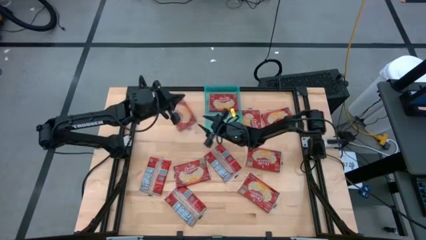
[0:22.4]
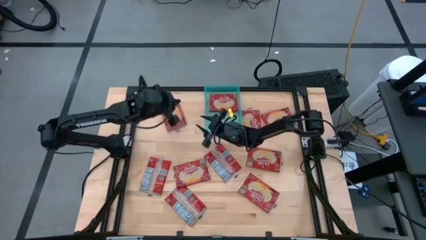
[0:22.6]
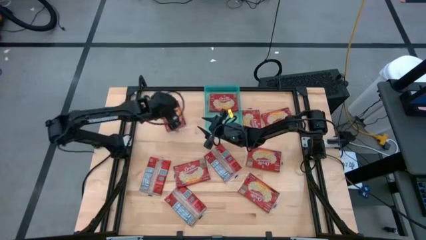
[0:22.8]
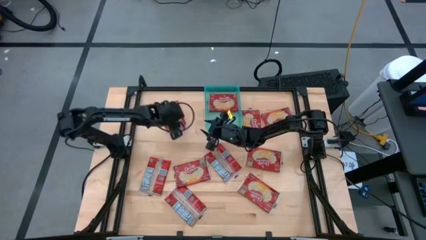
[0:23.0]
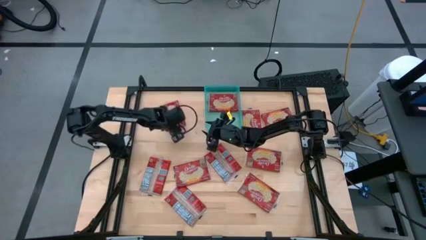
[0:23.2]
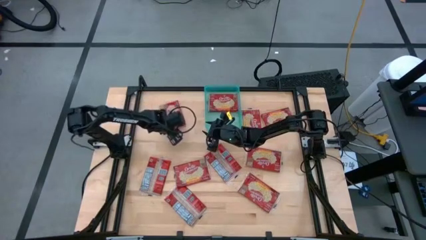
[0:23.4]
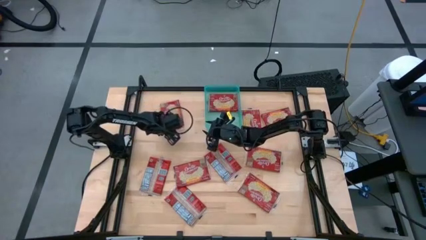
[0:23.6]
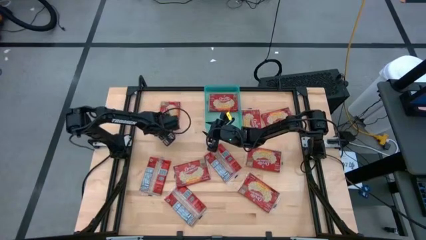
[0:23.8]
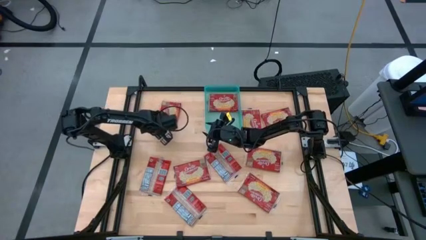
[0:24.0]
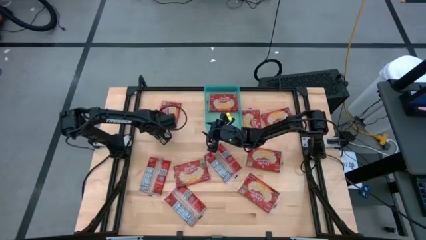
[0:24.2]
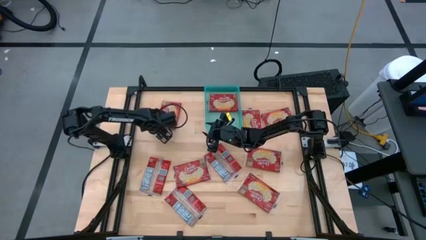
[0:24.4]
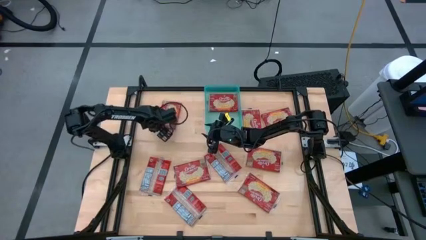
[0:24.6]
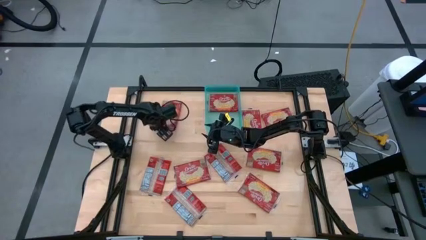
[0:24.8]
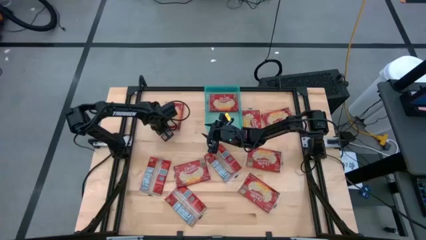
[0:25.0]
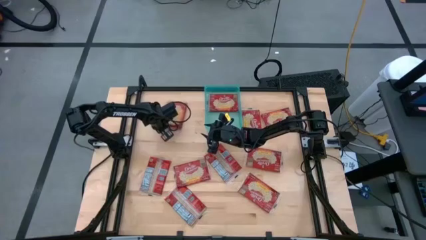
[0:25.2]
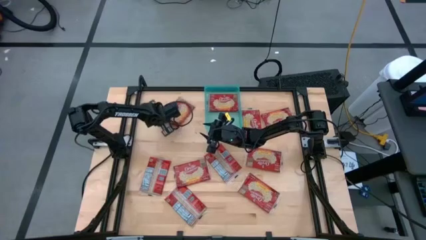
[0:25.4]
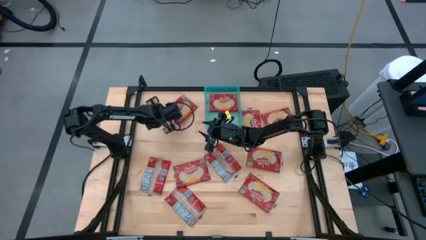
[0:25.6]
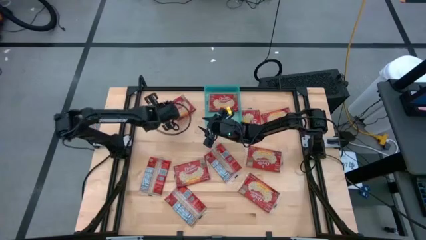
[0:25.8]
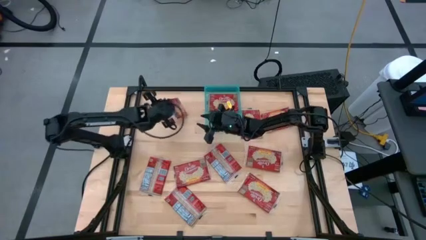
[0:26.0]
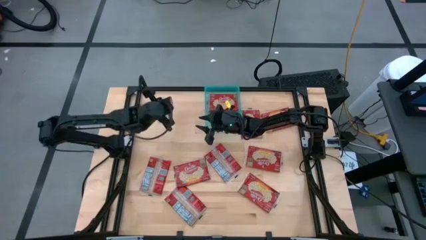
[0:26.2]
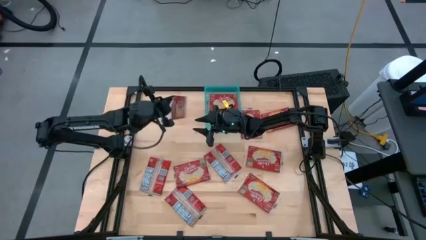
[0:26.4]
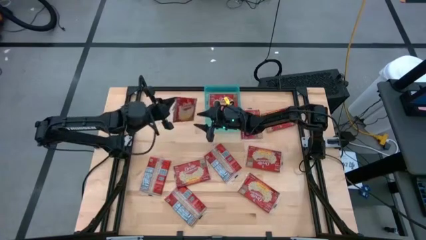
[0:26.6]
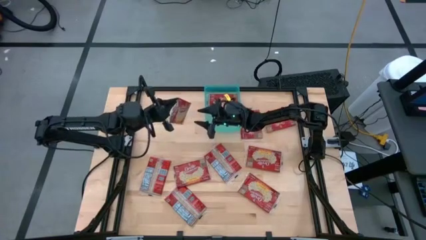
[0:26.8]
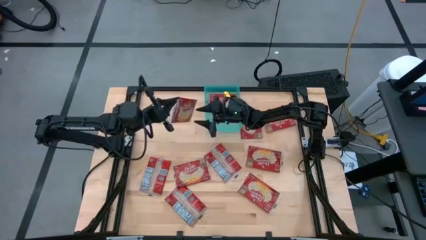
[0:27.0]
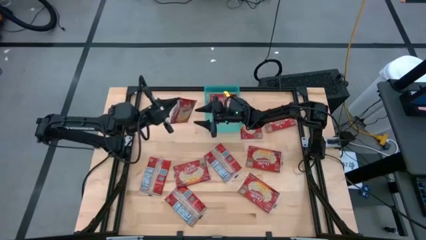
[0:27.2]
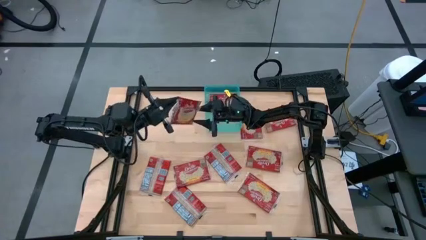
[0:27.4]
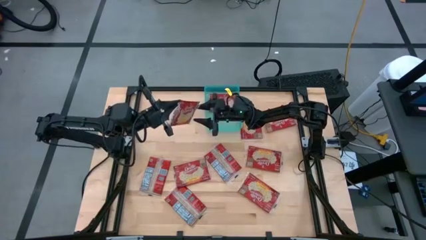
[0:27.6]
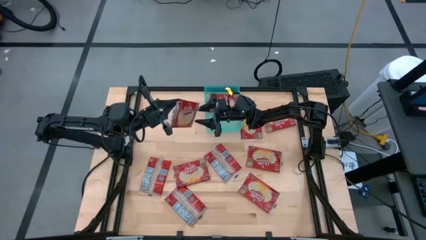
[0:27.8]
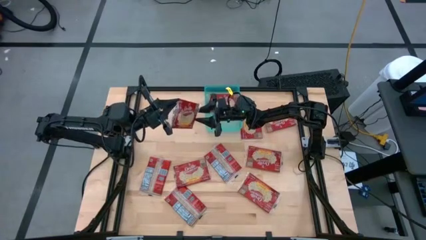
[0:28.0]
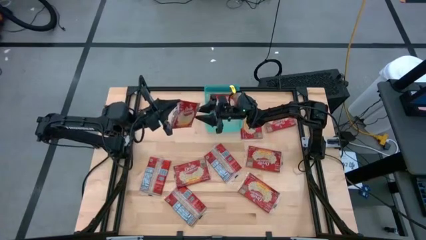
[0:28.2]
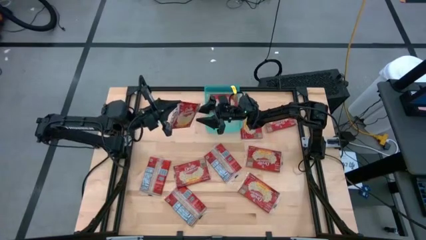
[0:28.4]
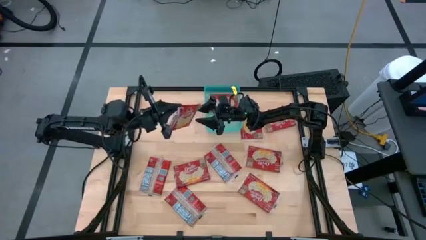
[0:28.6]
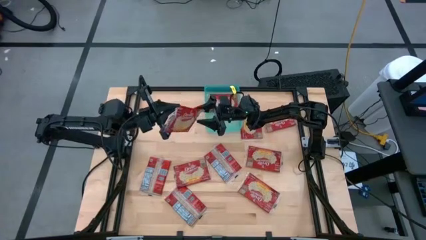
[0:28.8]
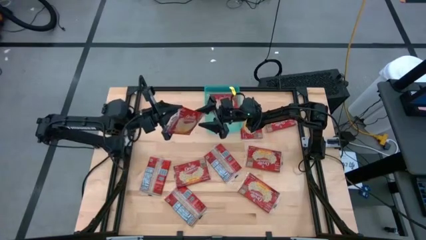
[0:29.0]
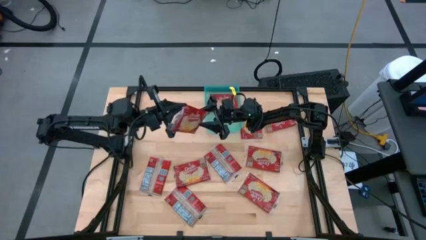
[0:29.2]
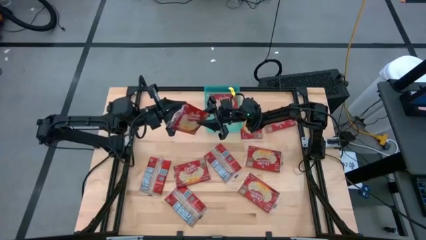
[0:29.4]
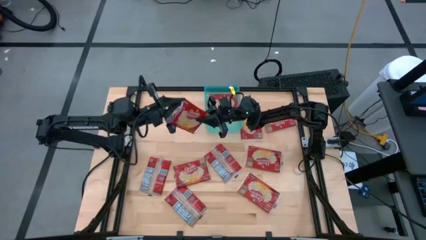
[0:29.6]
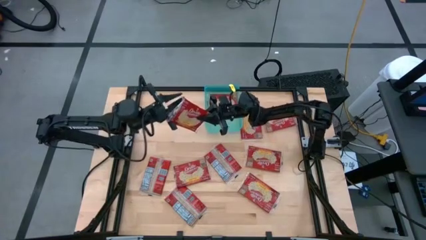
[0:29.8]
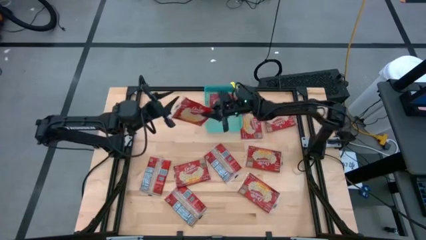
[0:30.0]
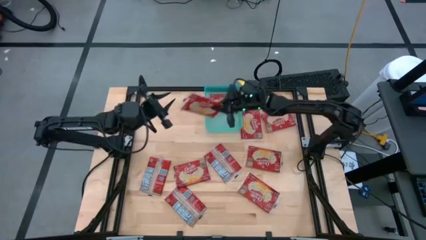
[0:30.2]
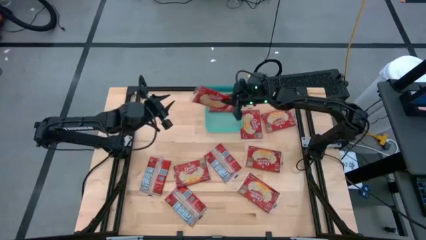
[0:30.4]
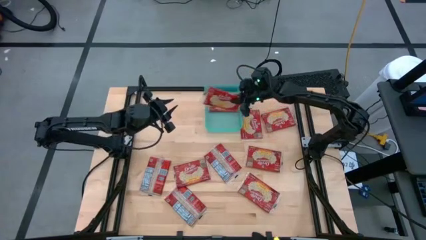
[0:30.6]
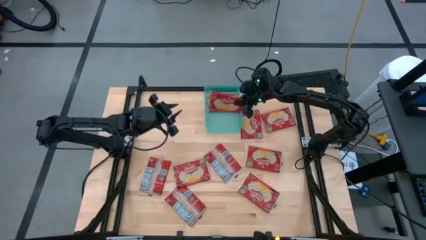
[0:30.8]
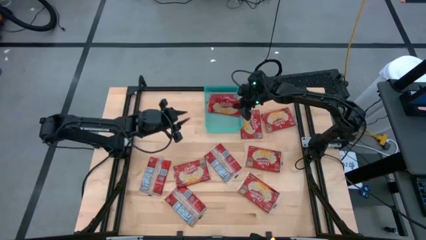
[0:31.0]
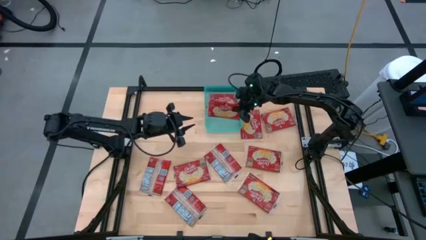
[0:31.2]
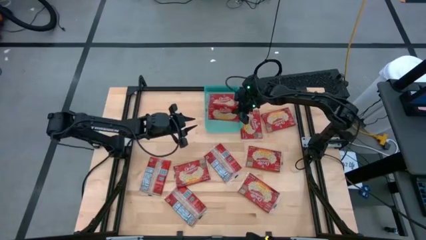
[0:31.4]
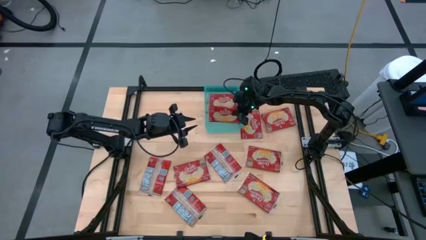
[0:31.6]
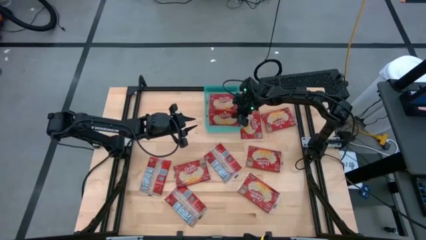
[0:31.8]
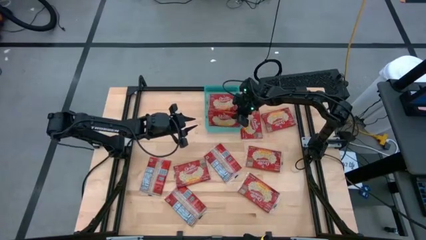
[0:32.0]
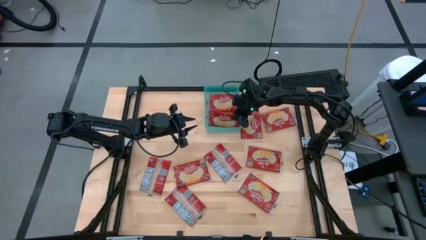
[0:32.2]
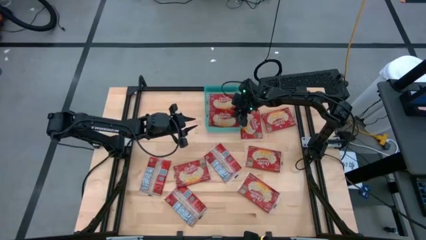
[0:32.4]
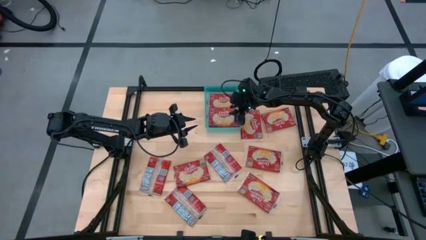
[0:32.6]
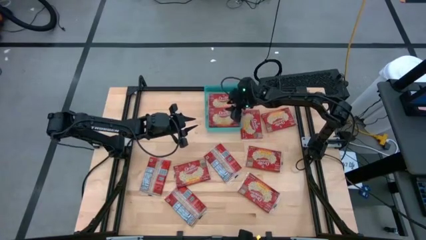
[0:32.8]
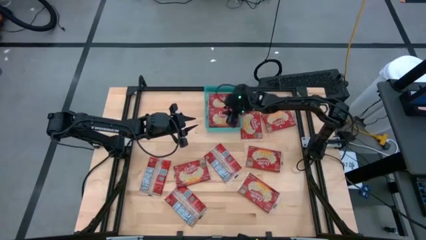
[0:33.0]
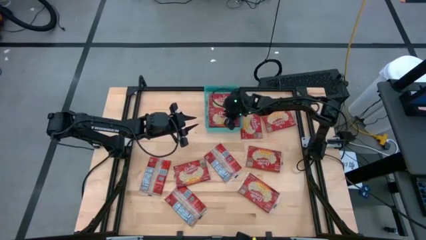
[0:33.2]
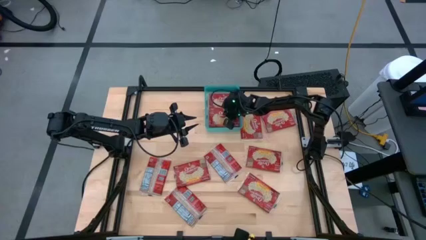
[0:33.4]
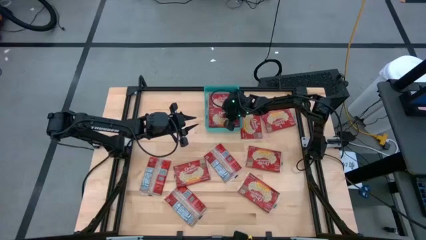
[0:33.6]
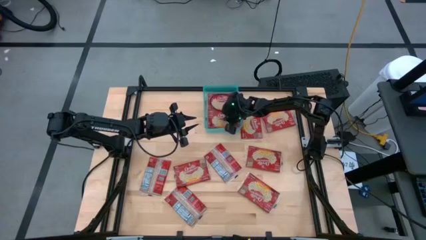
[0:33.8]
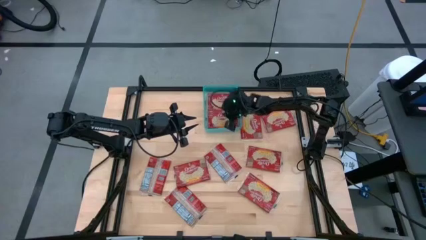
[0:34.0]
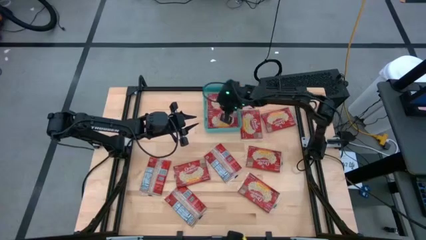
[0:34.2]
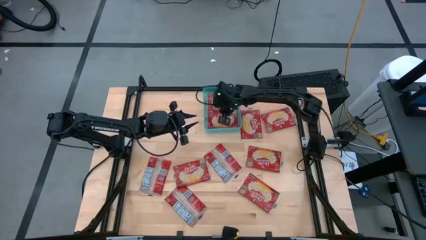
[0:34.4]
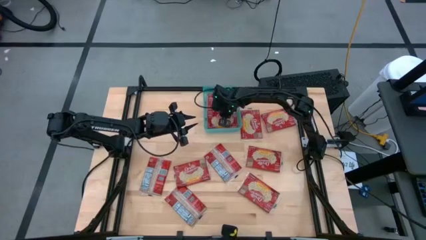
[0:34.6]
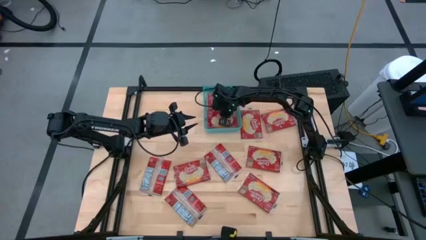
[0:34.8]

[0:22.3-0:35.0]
Task: Sort popcorn bags into baskets
Put the red popcorn bag into the blue bin
